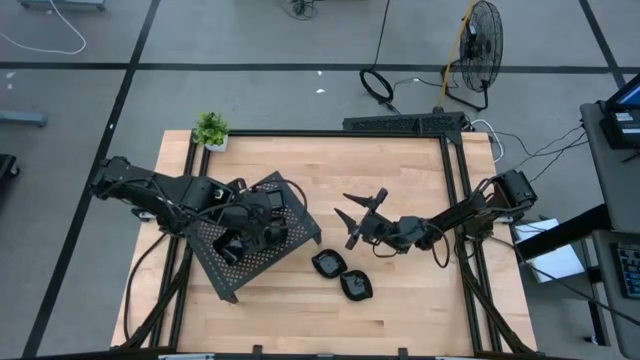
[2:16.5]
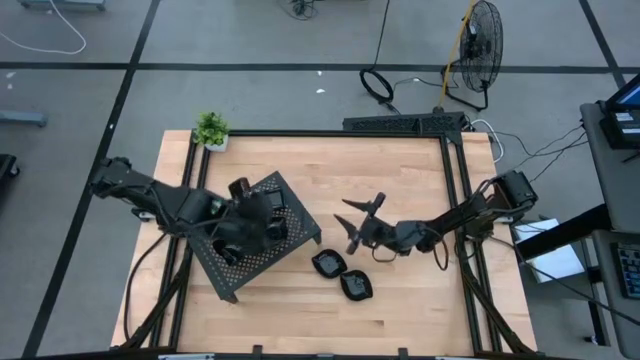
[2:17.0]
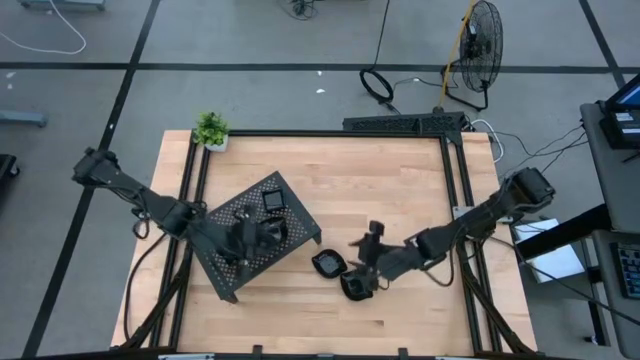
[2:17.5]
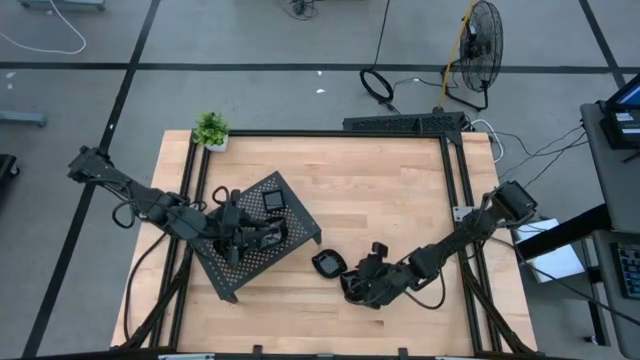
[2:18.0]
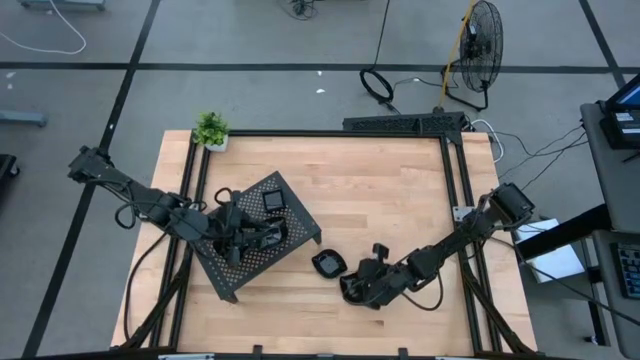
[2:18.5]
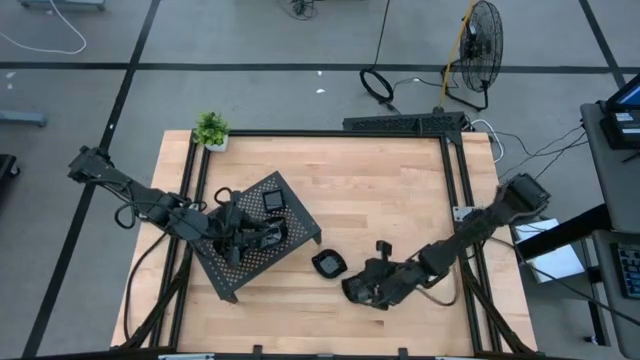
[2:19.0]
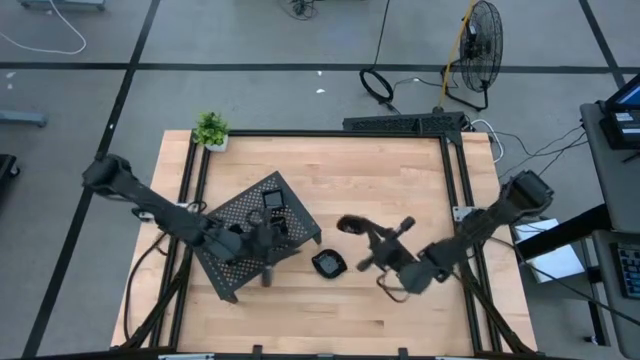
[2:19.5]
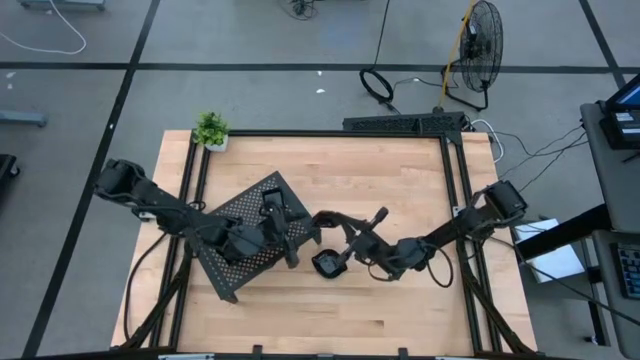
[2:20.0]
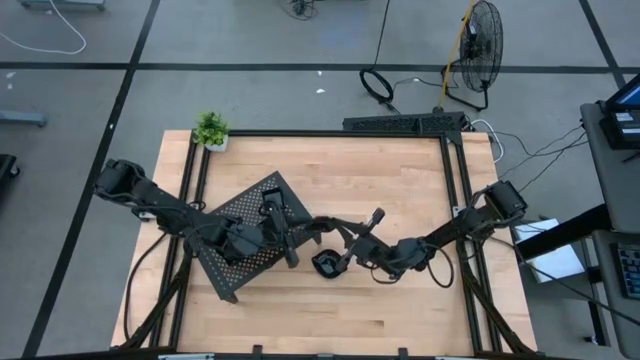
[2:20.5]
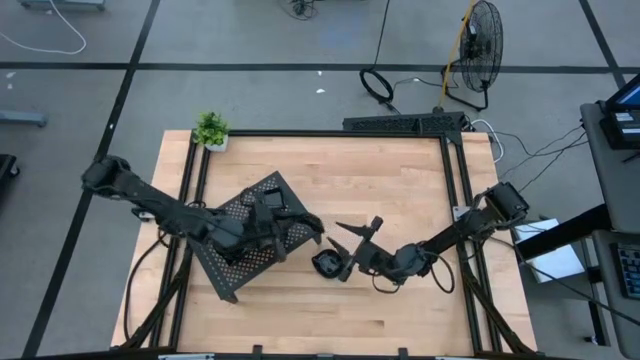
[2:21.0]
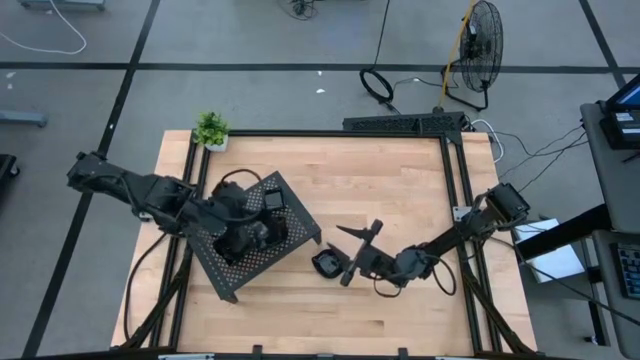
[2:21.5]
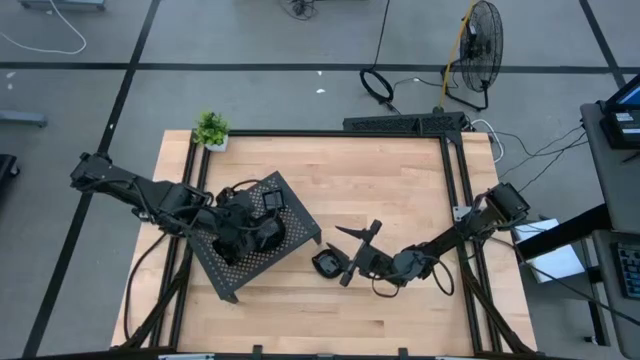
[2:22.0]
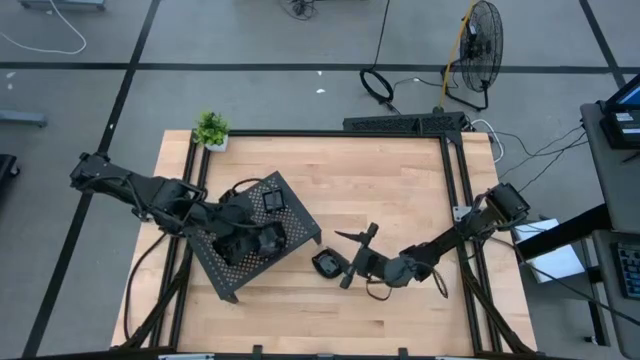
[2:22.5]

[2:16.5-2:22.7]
Task: Pick & Place Mini shaped plates
Stack the leaf-shaped plate on top of the leaf-shaped plate on the shelf

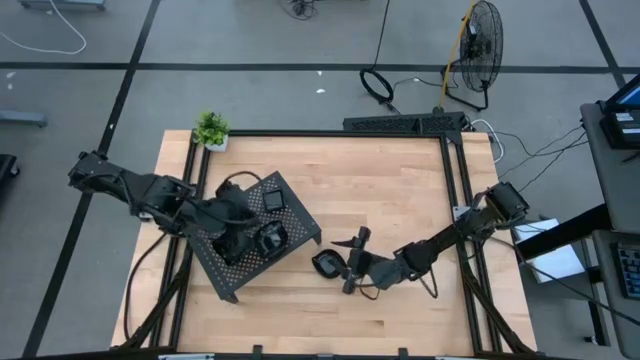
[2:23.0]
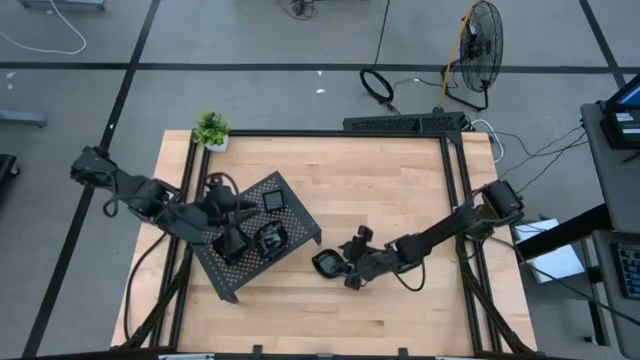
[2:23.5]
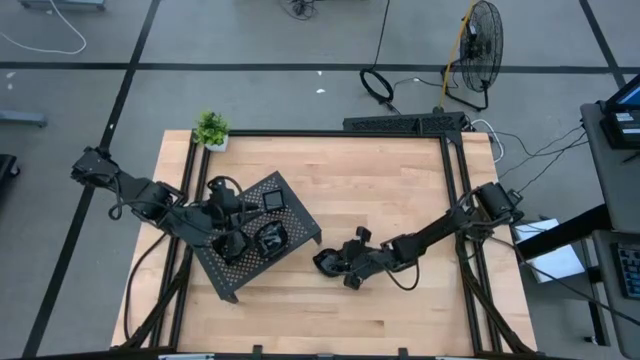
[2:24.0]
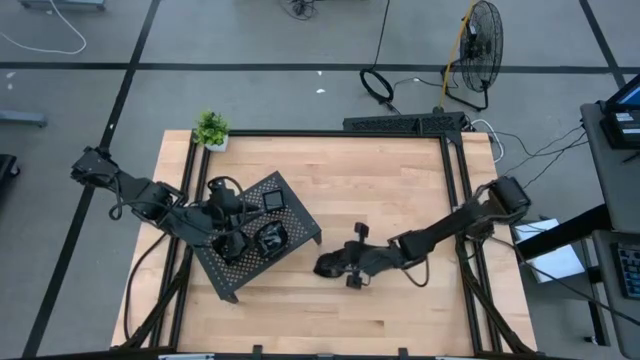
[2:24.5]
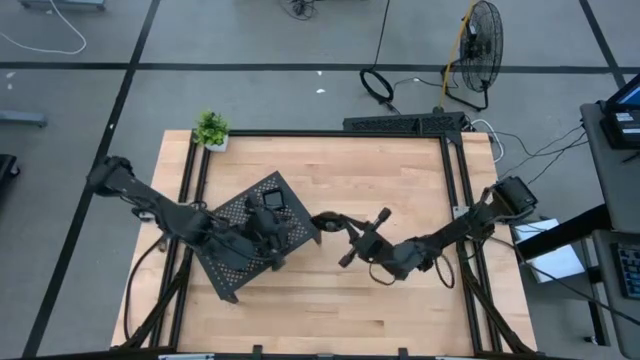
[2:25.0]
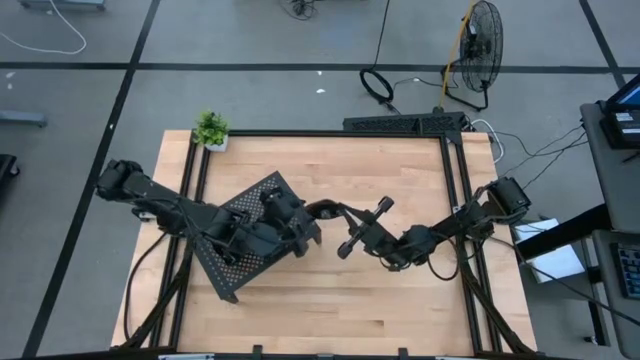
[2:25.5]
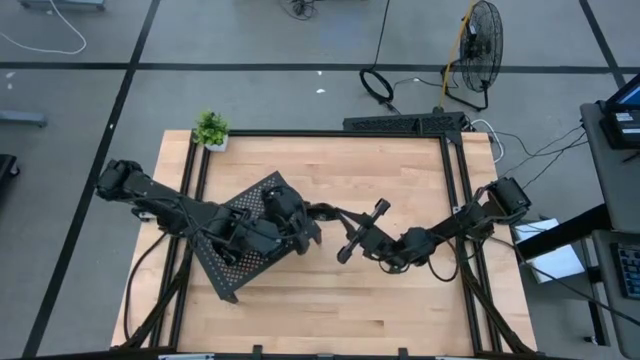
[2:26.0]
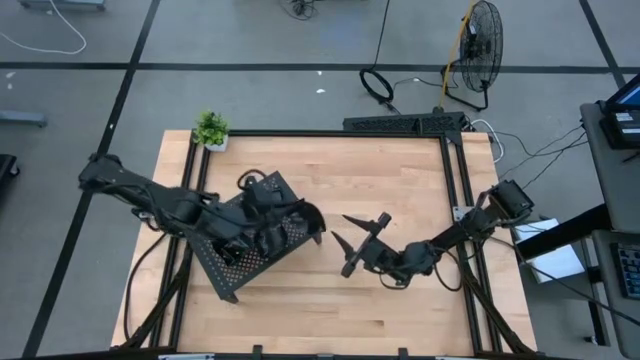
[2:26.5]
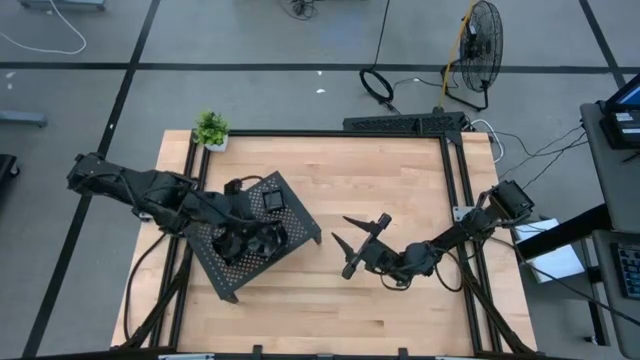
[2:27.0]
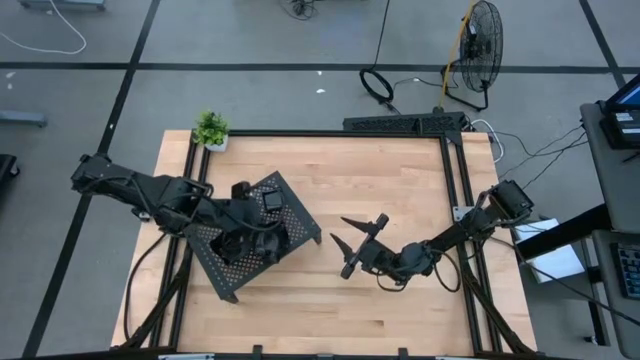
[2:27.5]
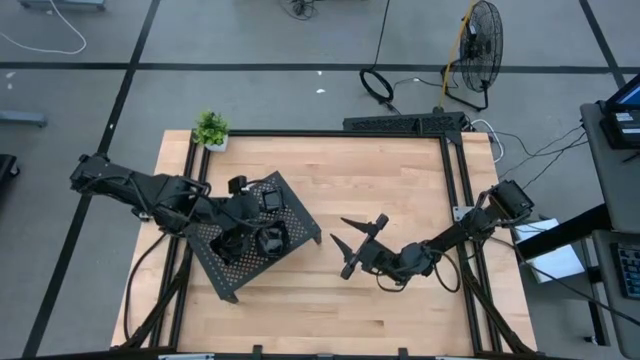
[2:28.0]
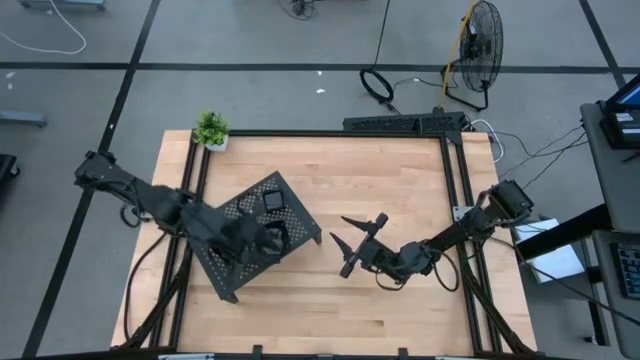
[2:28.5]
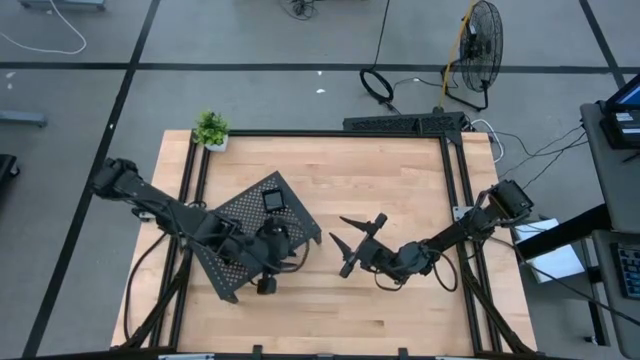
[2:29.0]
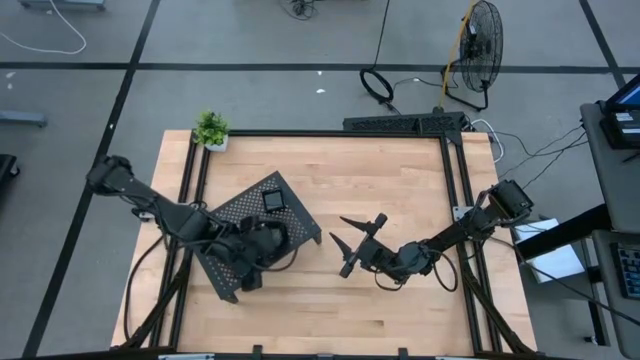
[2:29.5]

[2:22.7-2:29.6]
Stack the leaf-shaped plate on top of the leaf-shaped plate on the shelf

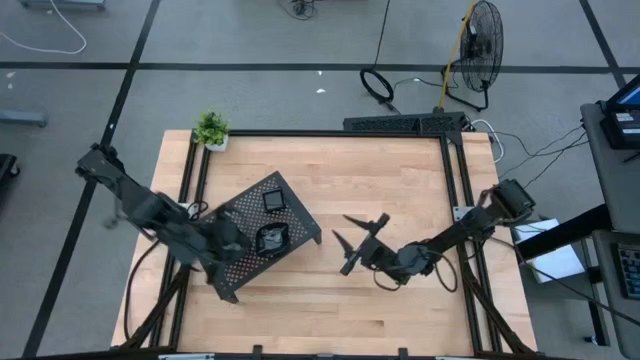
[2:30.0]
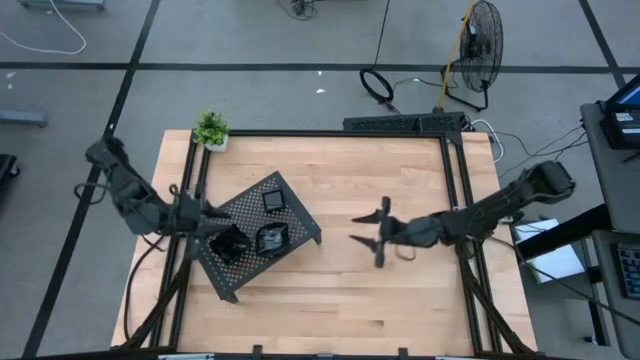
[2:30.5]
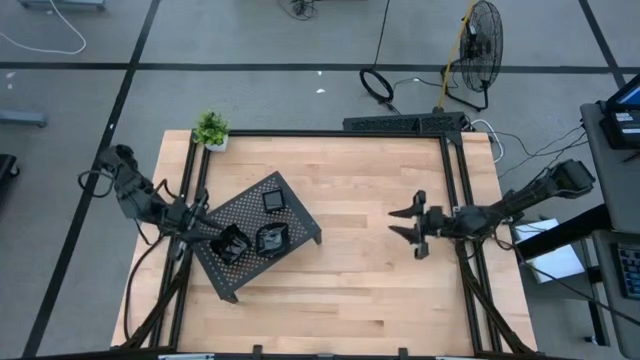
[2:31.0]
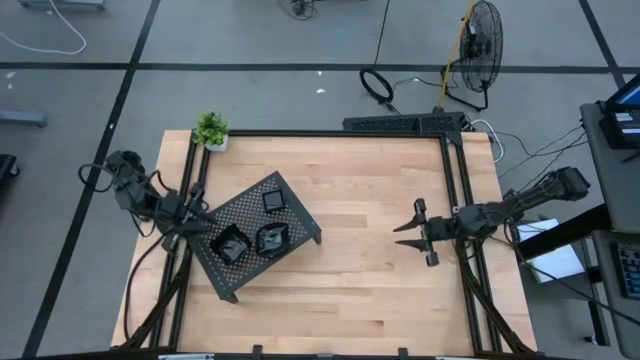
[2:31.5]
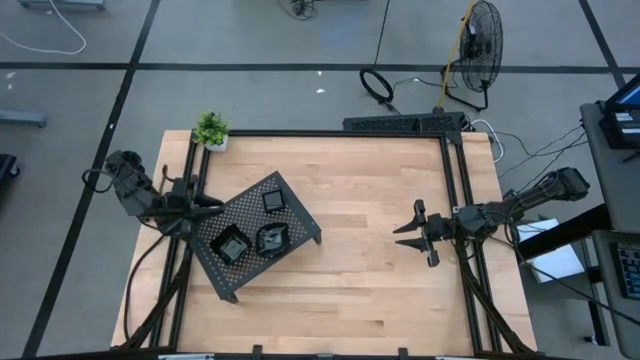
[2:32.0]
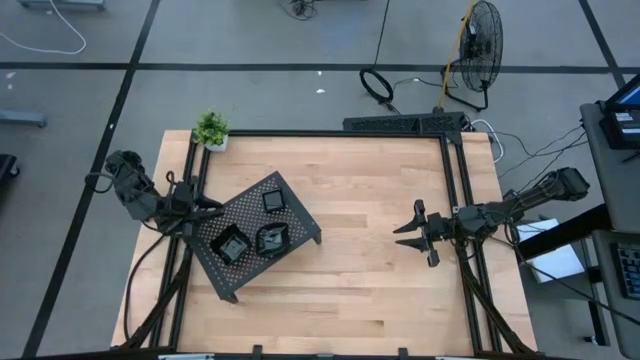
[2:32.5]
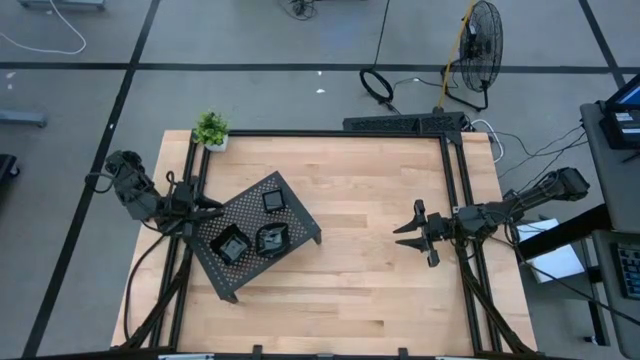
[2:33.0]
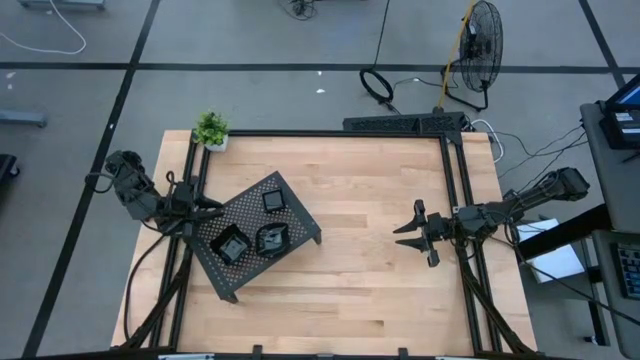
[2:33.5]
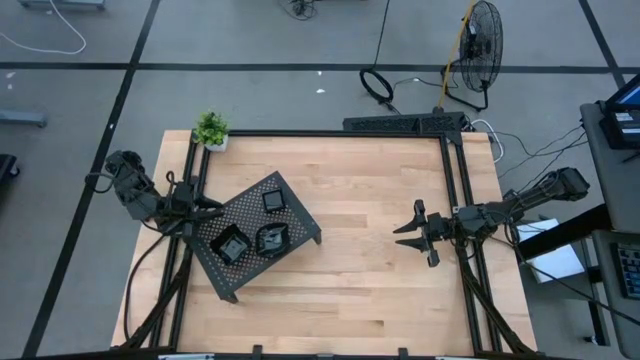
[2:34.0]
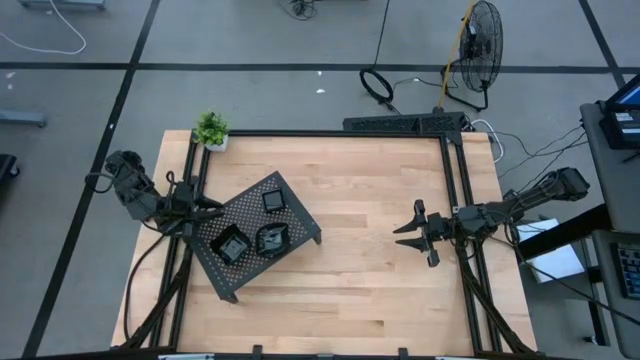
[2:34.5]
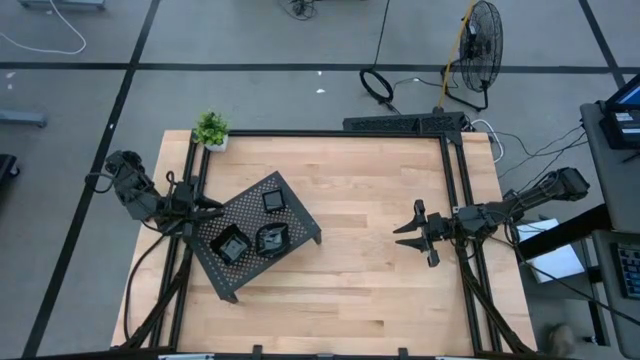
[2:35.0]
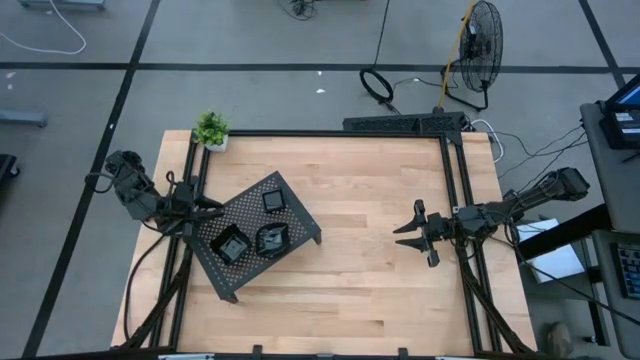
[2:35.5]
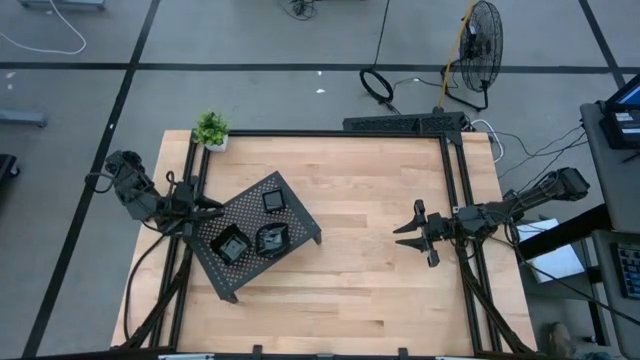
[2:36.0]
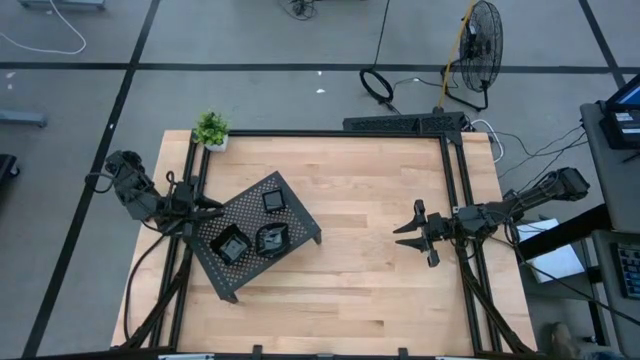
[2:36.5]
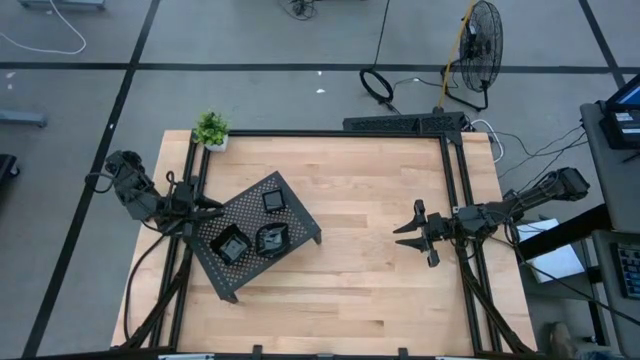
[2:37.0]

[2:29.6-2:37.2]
Return to Home Position

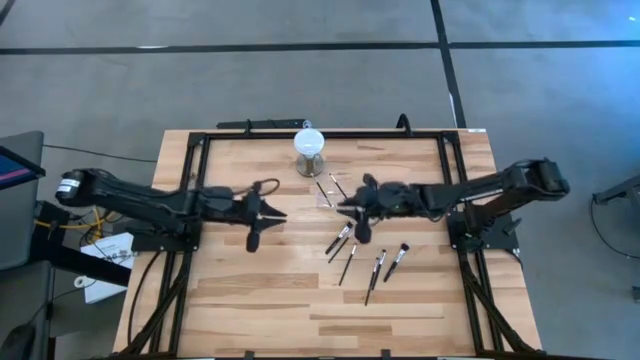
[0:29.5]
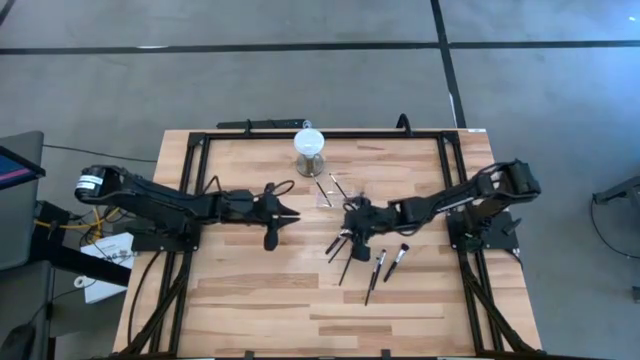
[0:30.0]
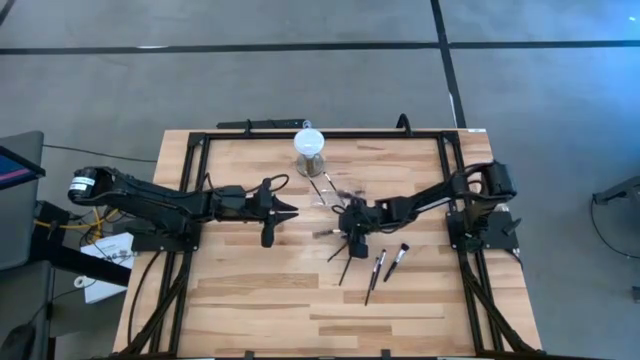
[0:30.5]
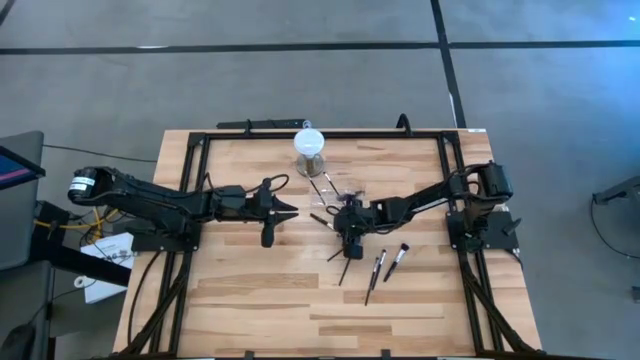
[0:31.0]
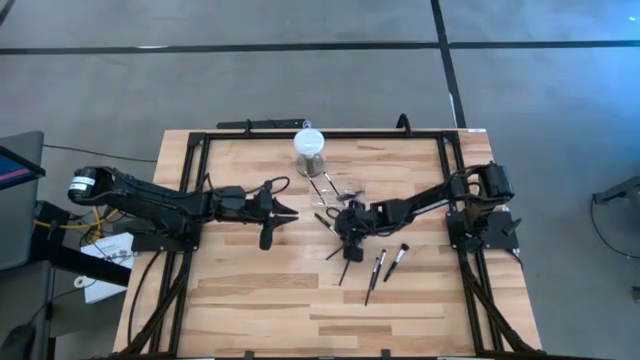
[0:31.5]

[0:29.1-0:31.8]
Task: Put items in baskets/containers
Put the black foundation brush into the transparent organizer
